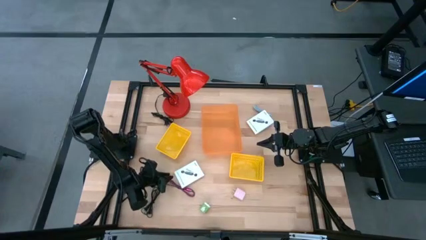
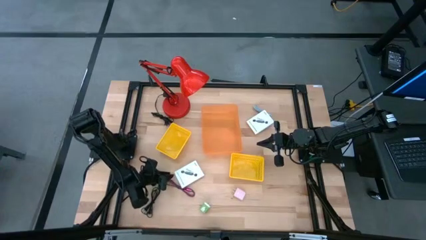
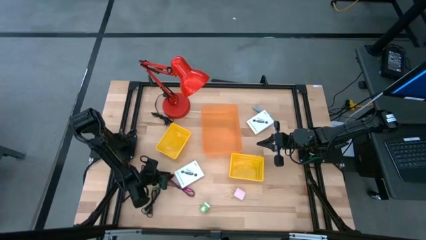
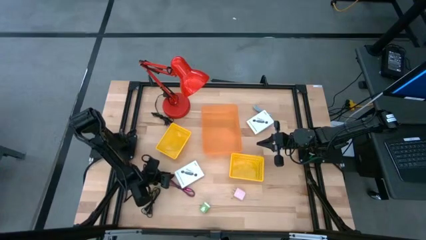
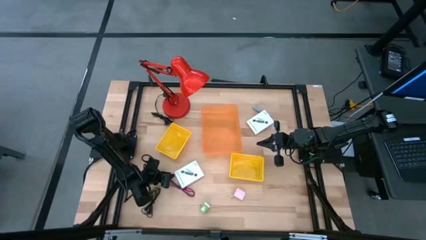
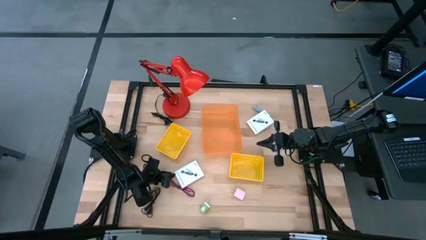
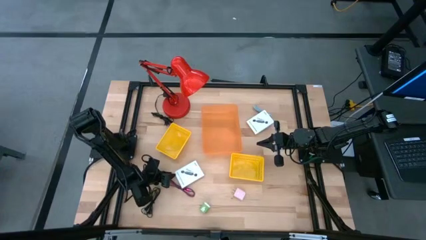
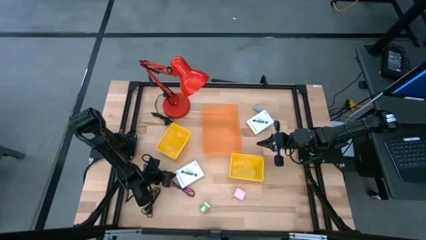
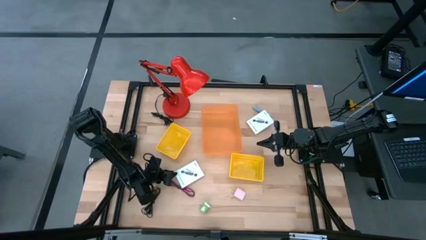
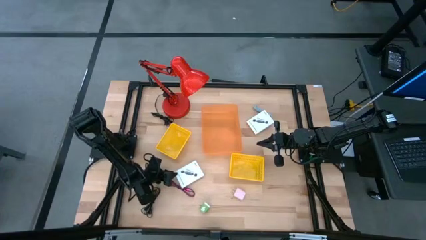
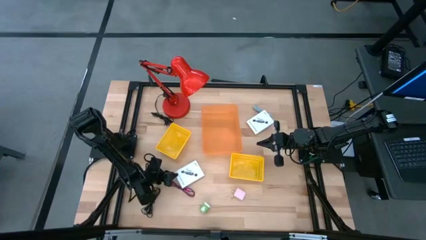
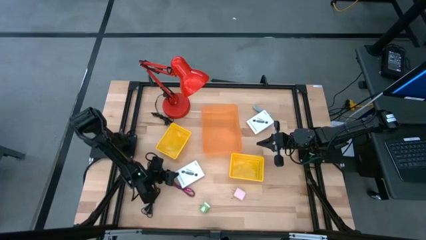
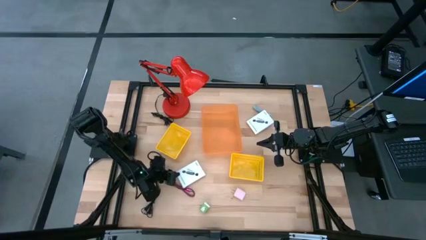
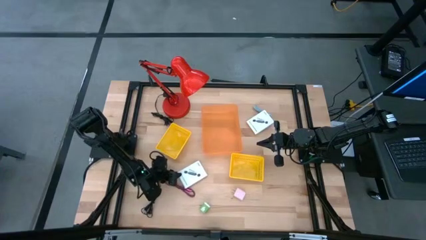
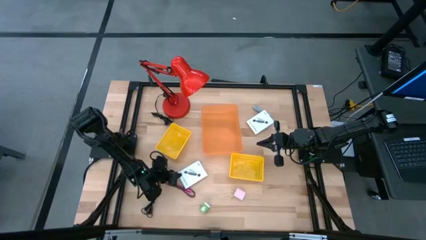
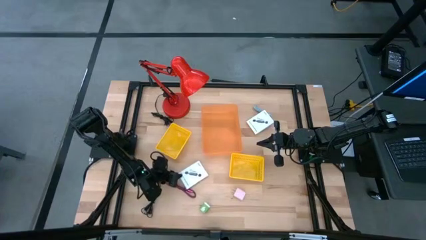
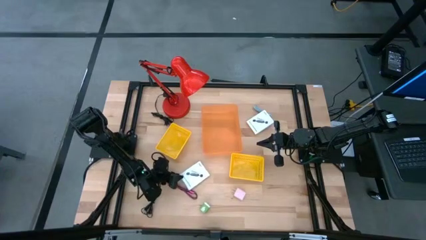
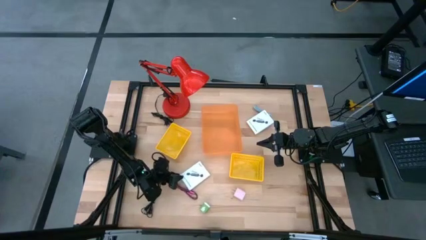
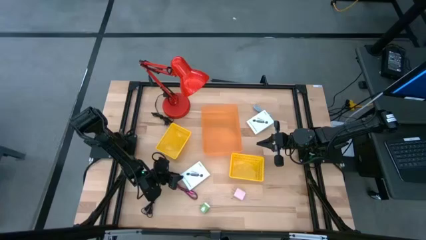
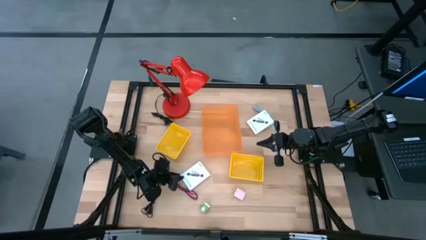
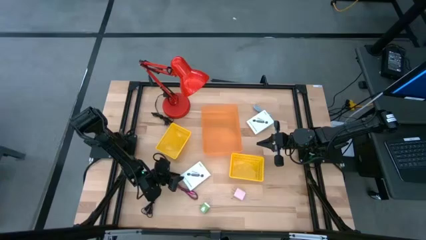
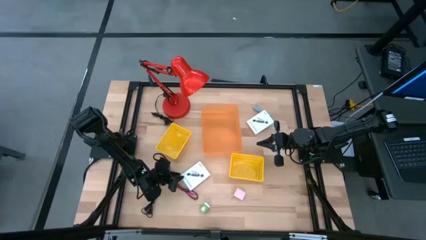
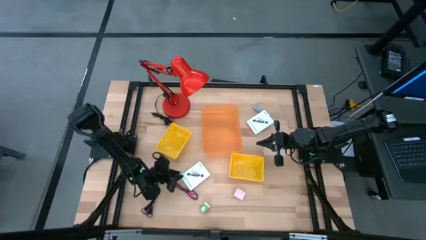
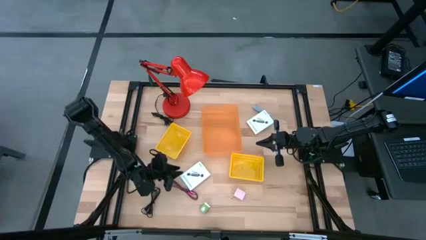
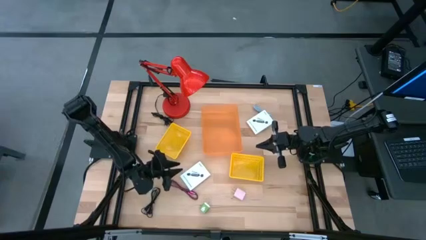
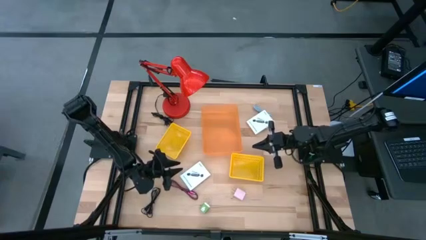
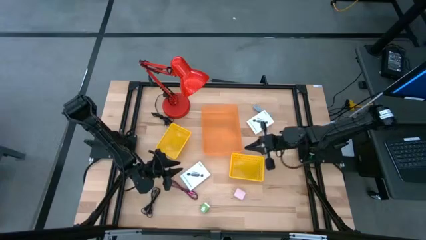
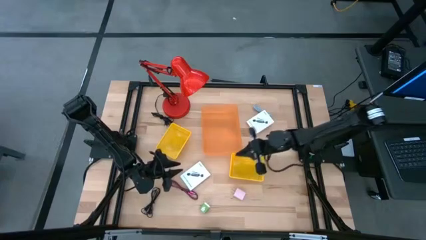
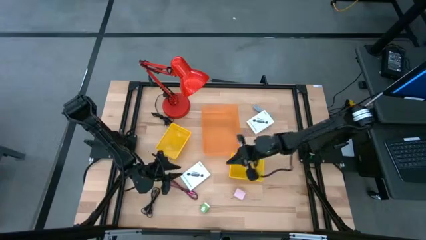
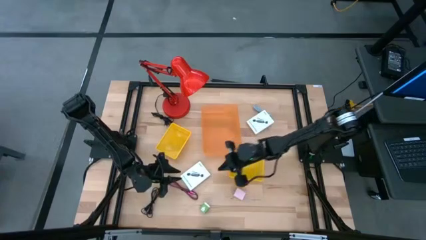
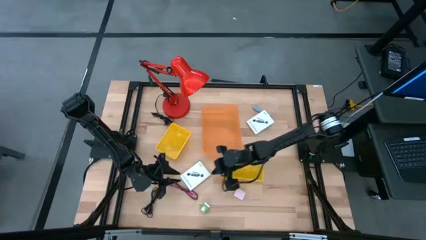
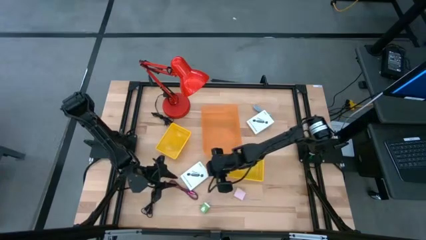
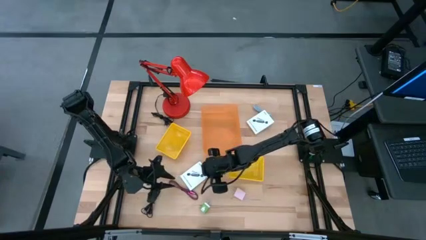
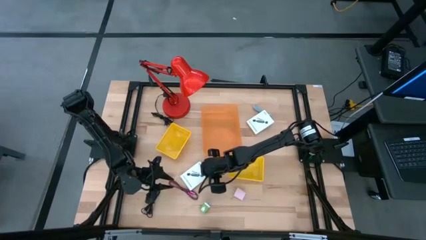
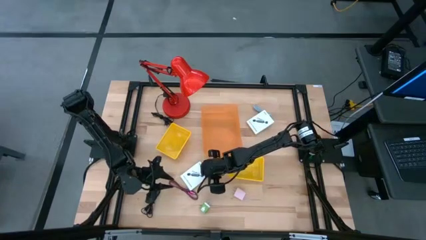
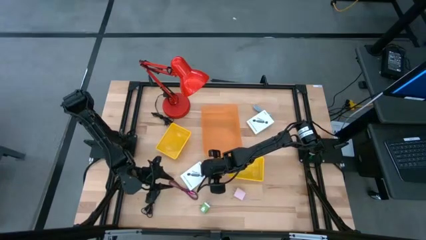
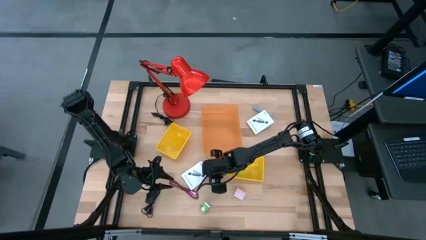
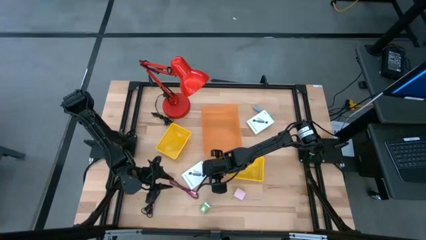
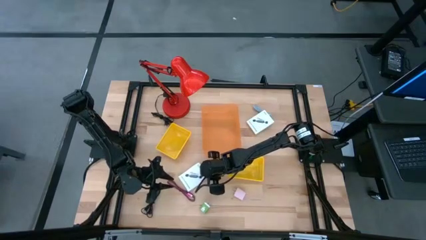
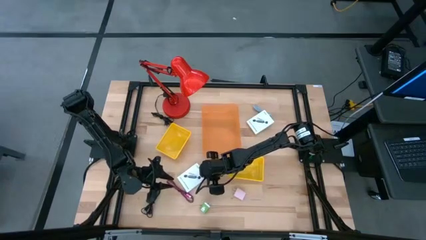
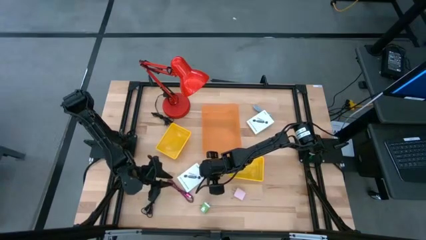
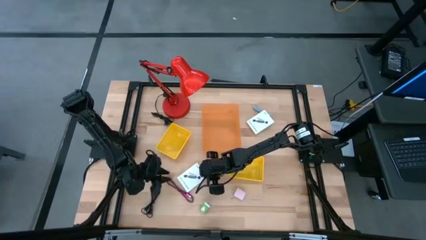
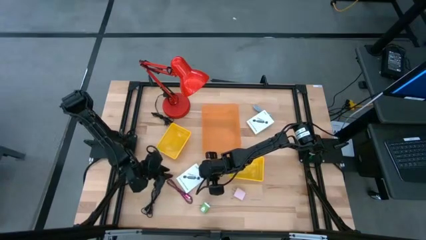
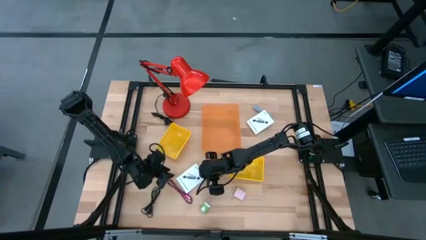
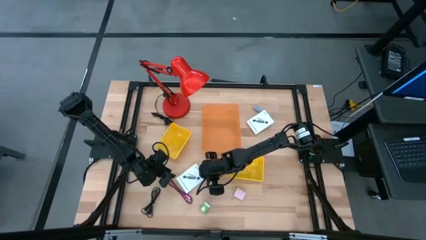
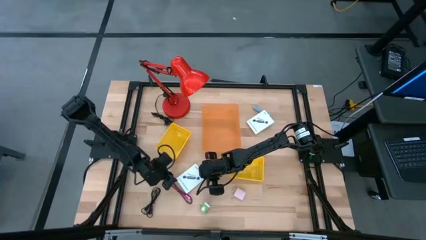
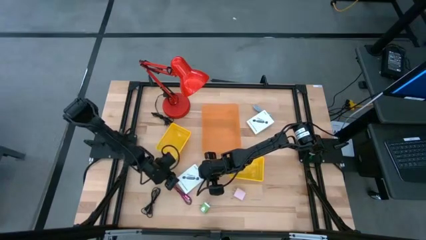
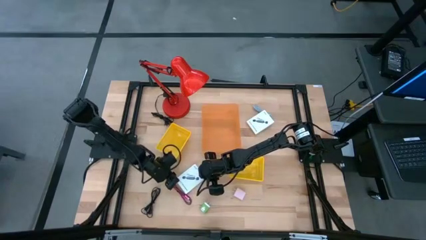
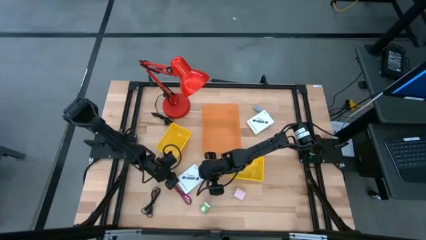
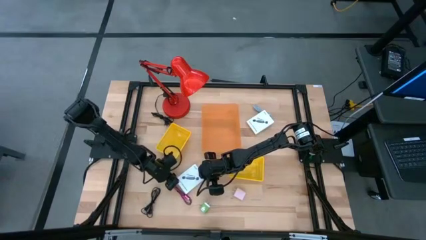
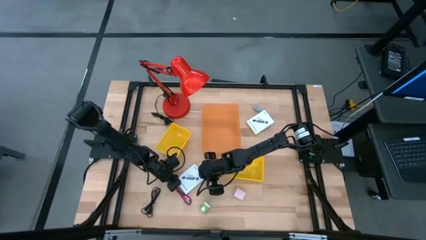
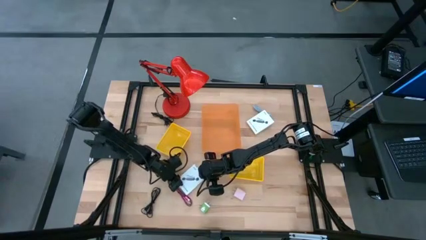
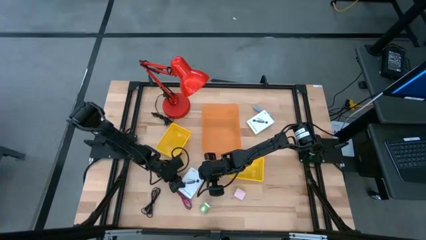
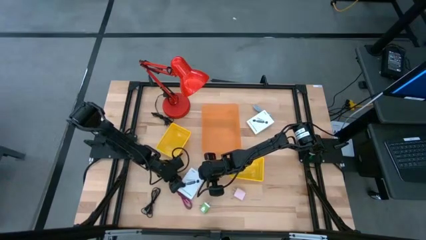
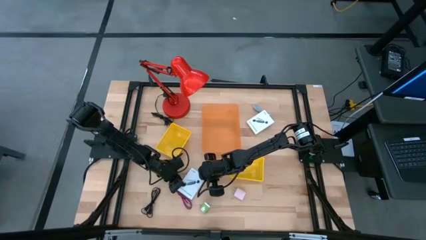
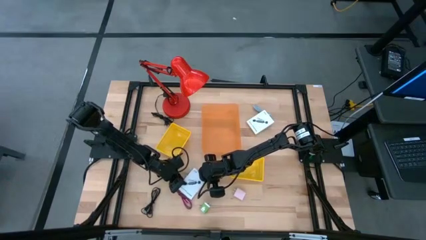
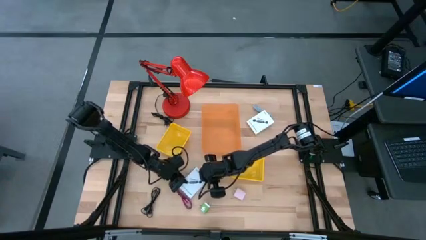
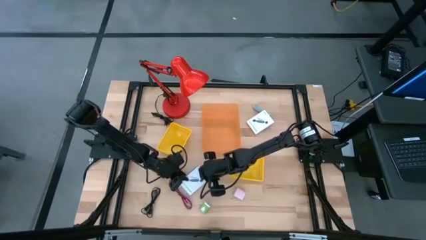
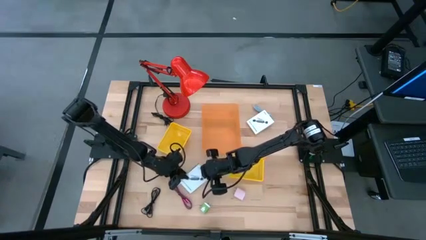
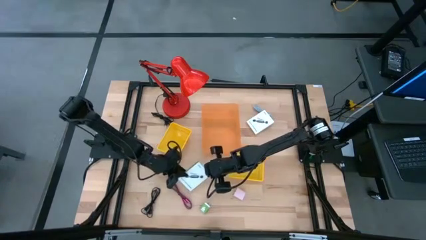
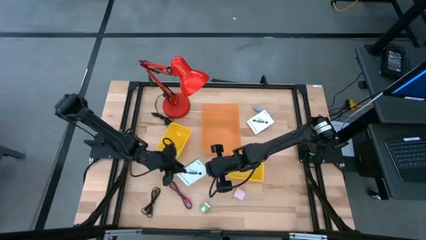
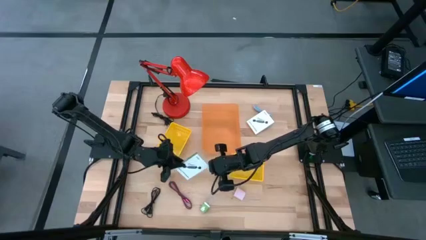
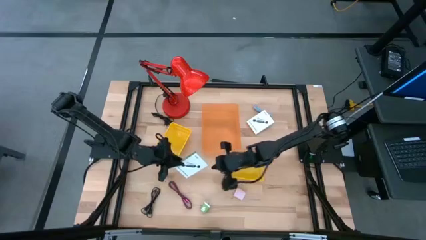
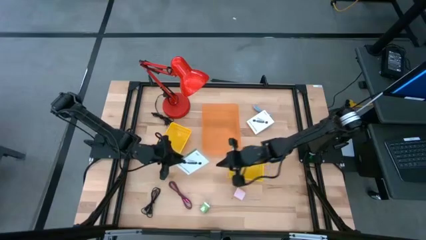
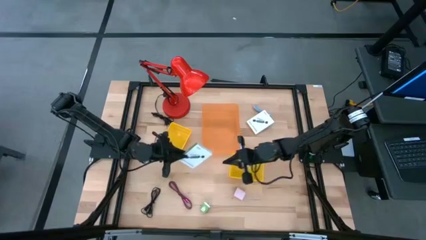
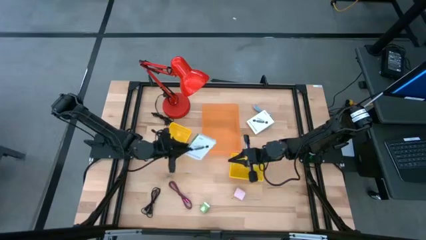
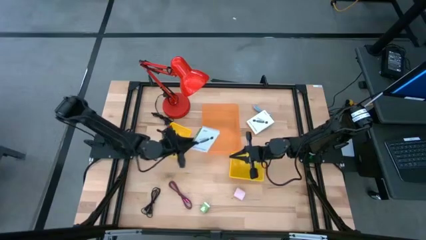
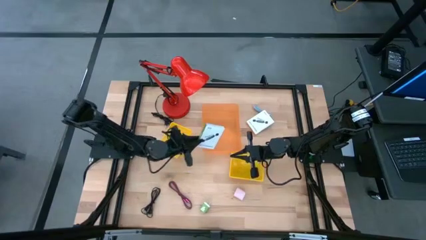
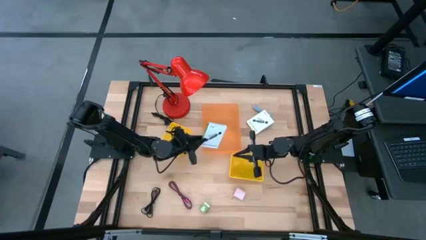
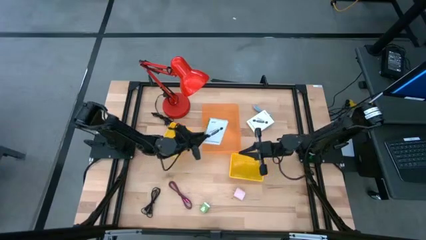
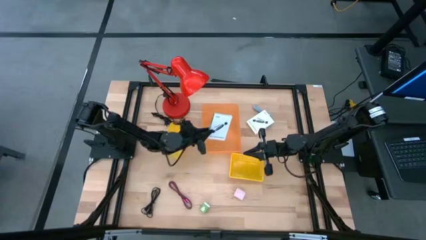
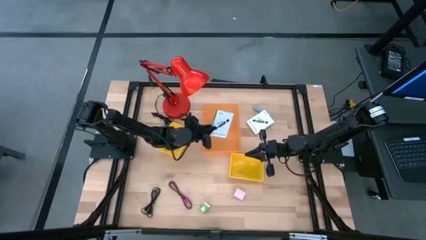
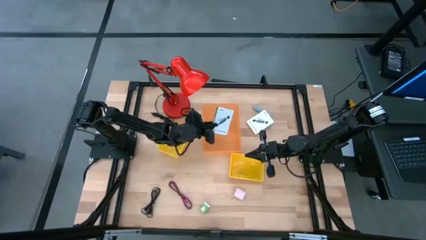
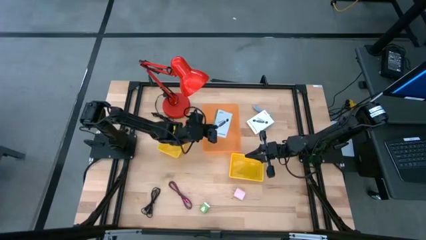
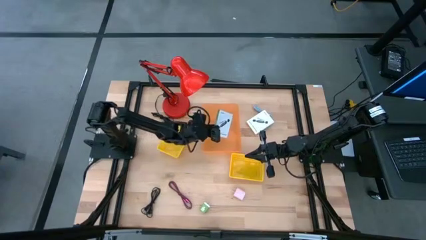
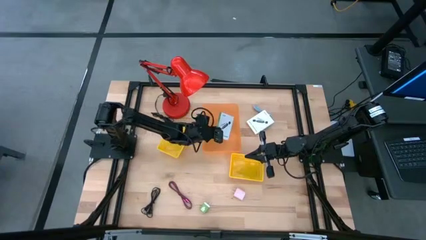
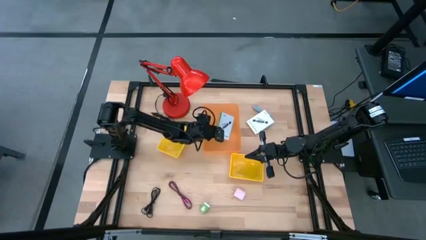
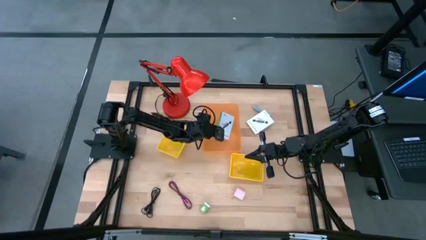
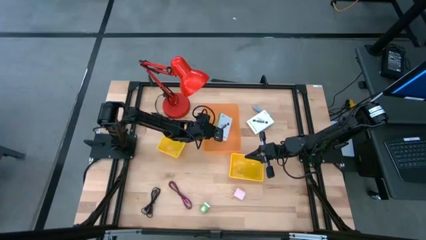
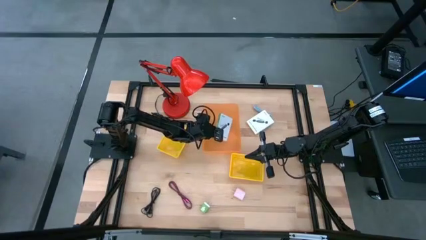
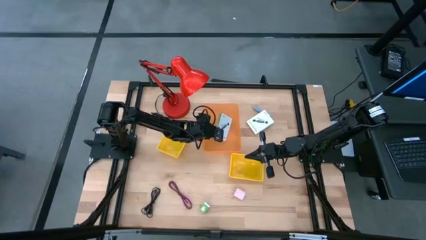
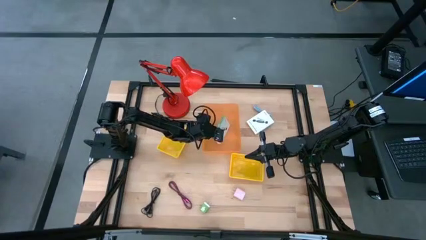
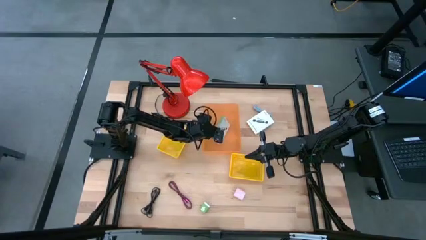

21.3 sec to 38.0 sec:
Task: Pick and place items into bin
Put the bottom card reader box into the orange bin
